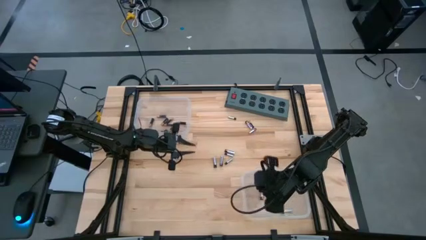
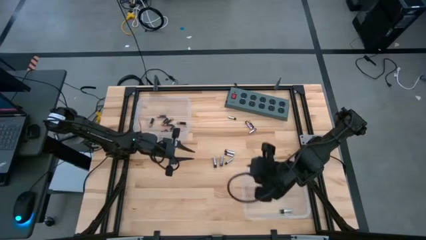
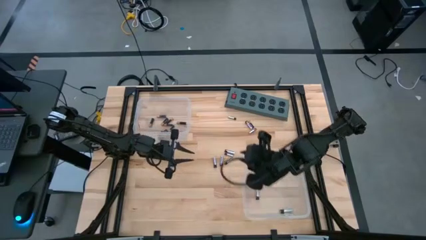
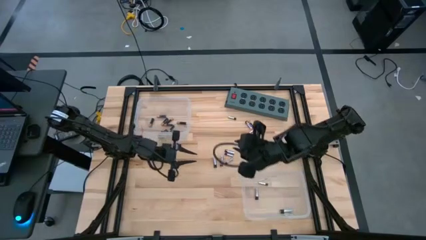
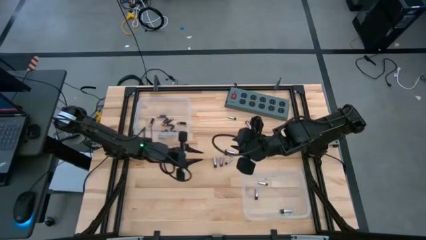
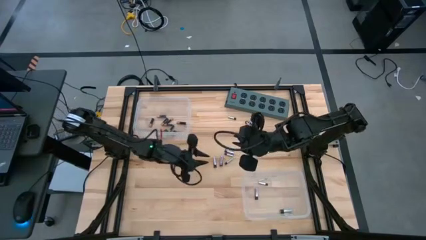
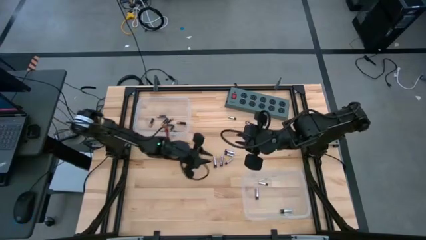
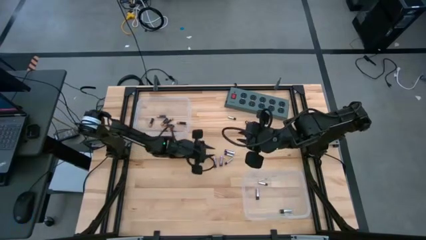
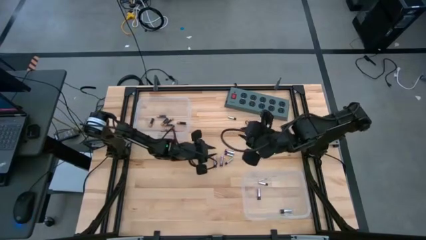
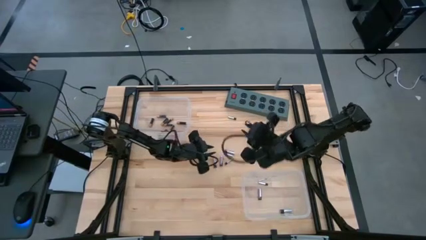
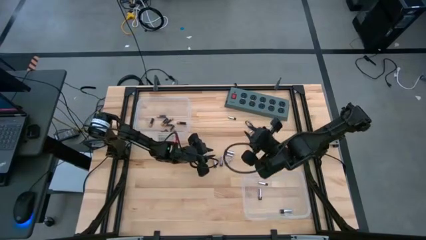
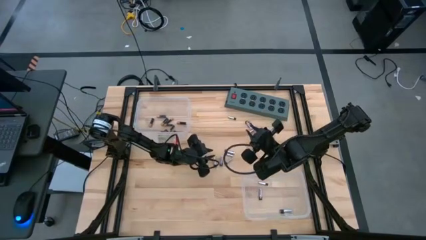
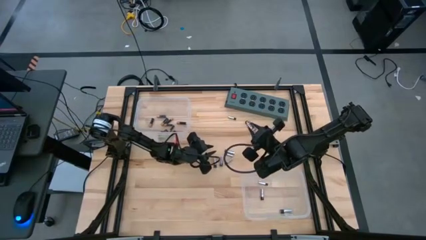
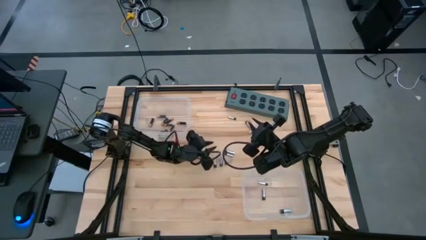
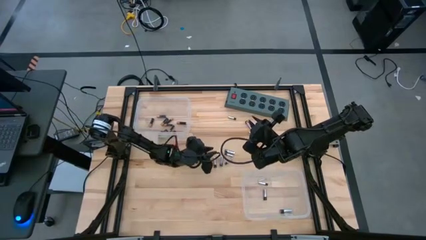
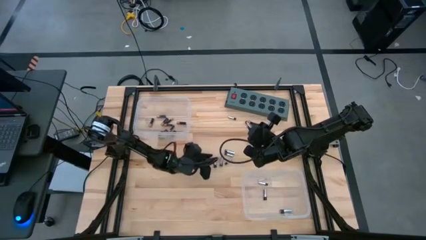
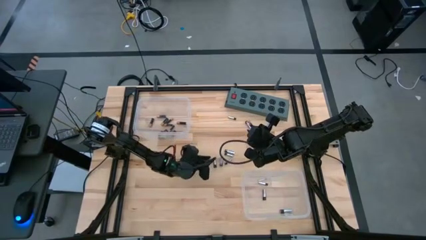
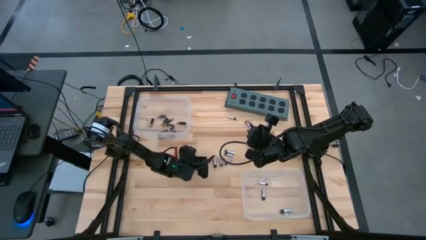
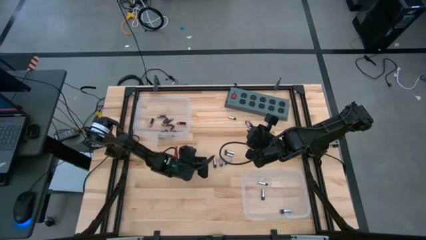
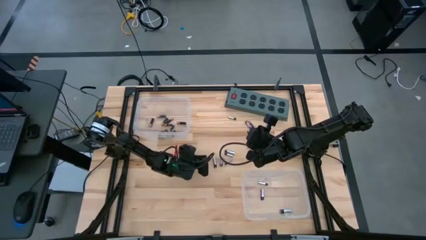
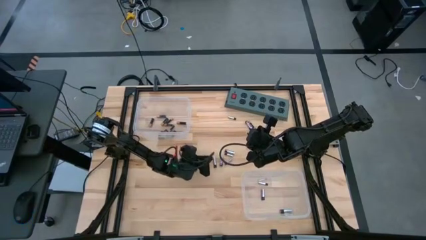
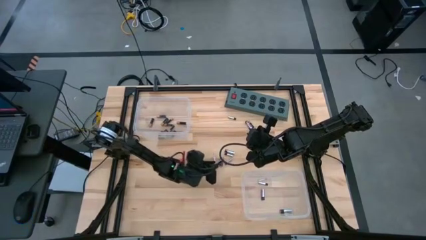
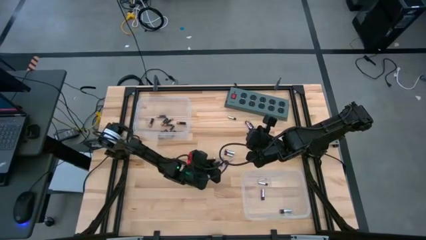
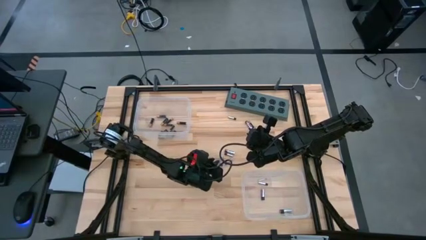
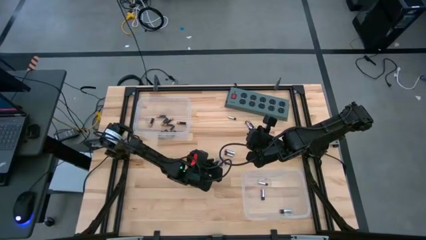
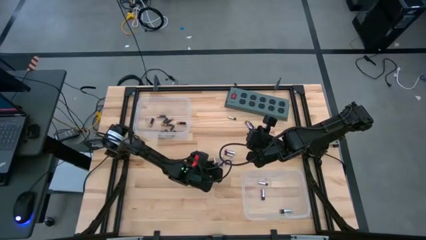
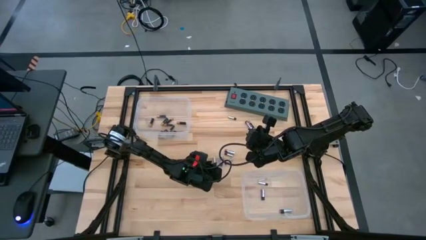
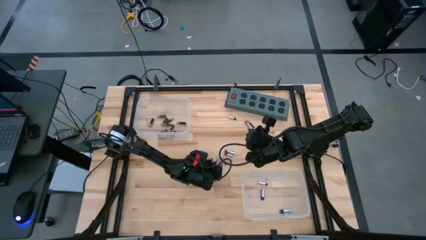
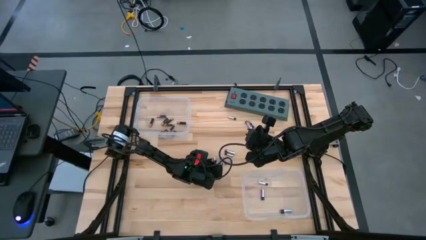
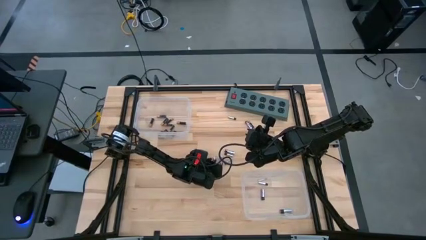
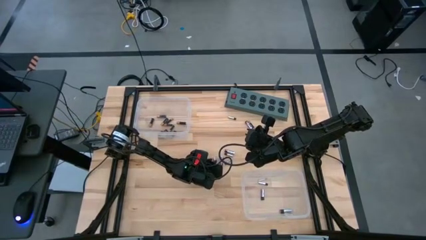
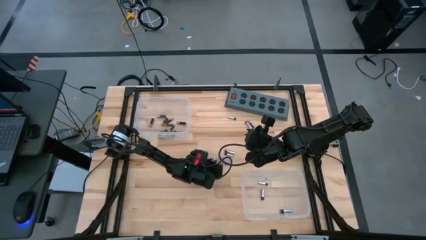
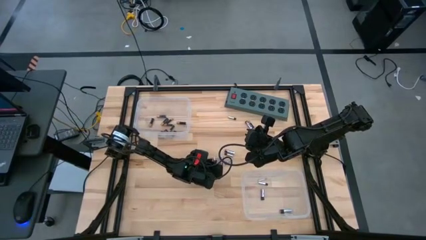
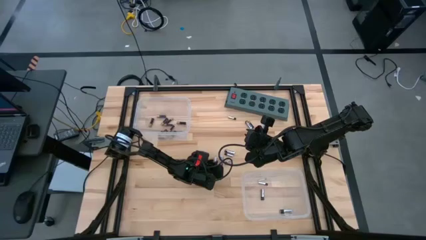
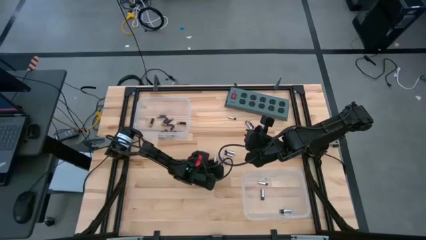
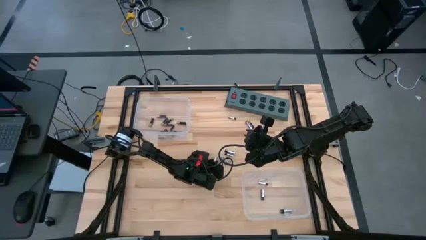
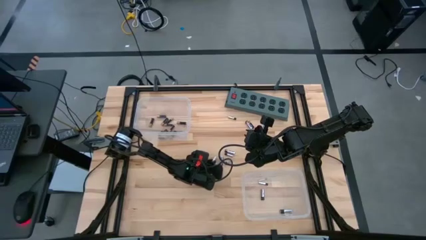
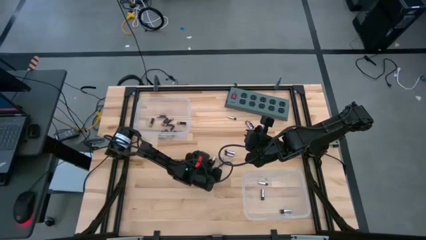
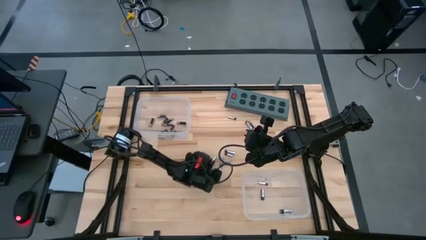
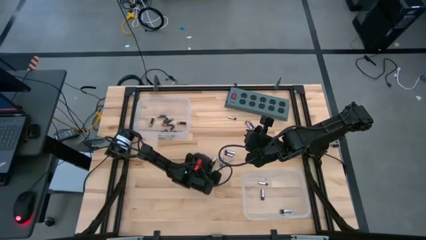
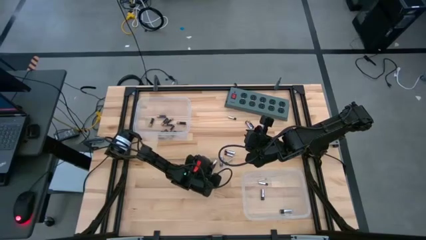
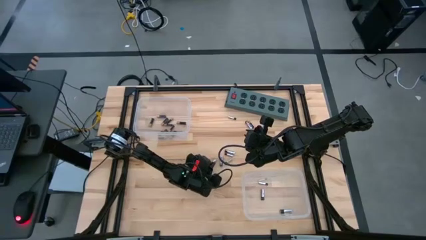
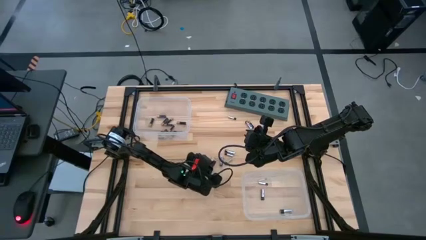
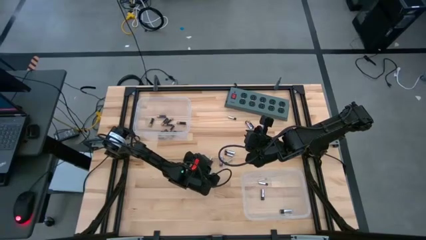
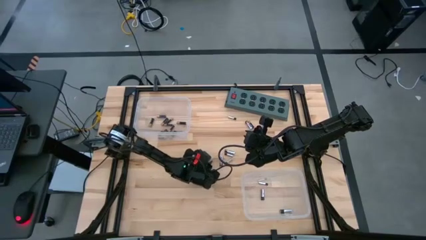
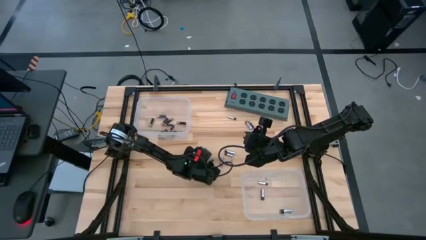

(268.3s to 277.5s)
Task: Sort batteries
Put the silver battery into the bottom transparent bin

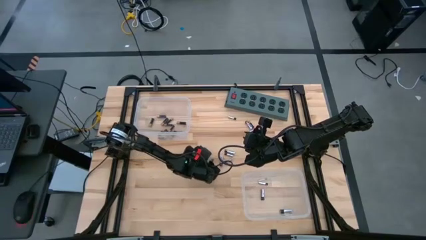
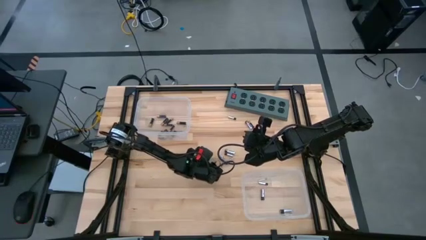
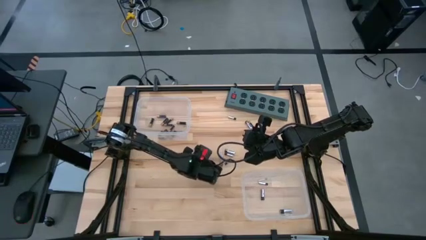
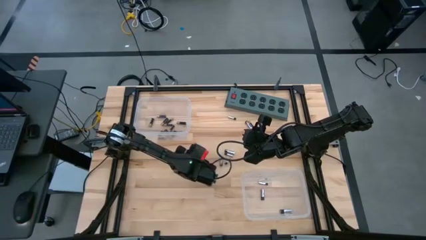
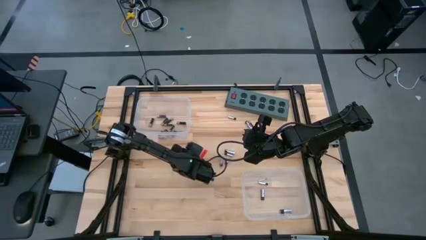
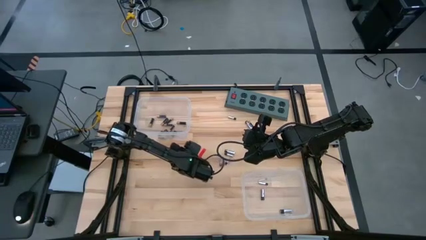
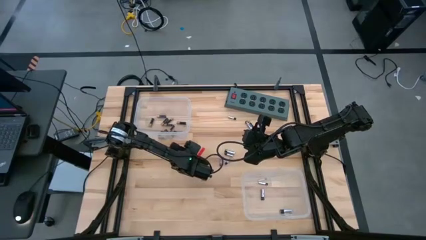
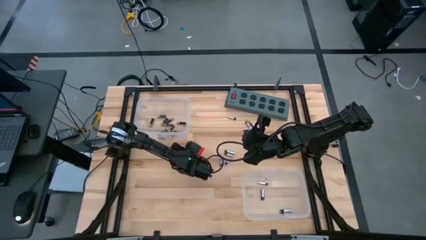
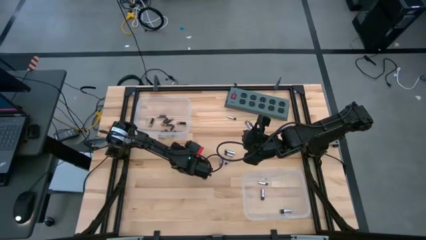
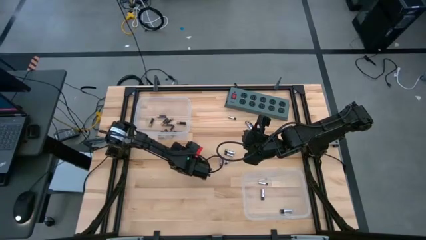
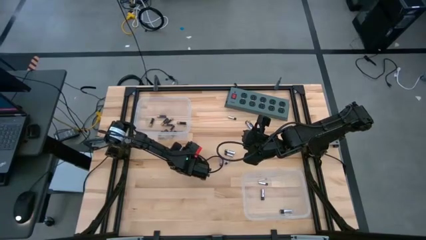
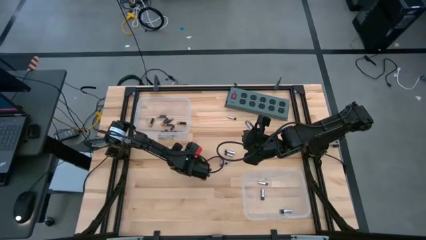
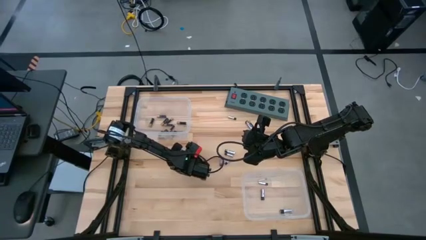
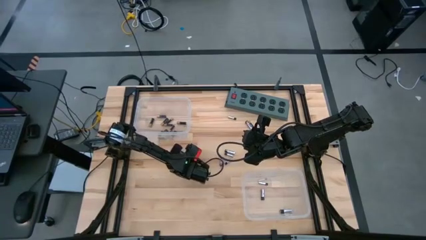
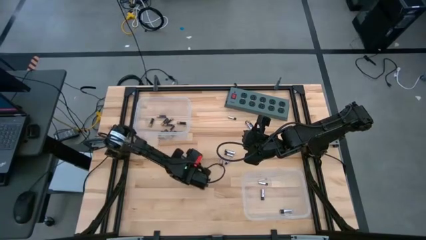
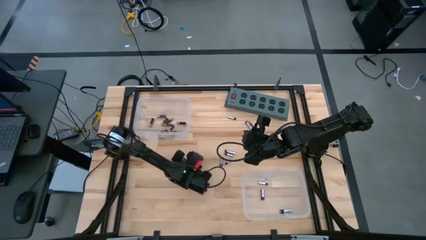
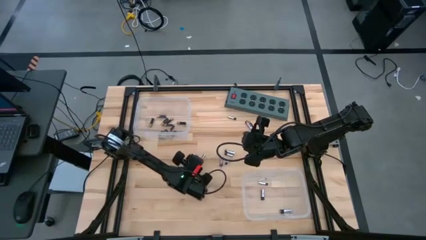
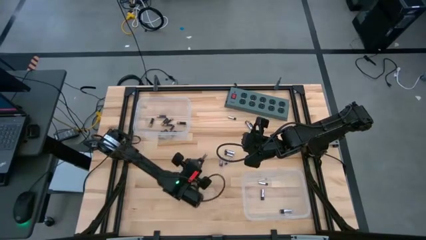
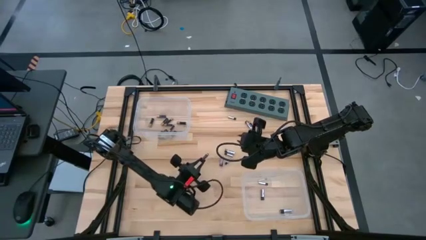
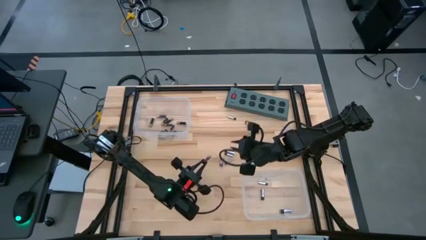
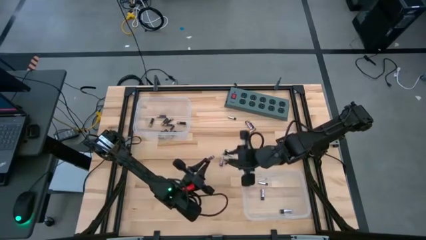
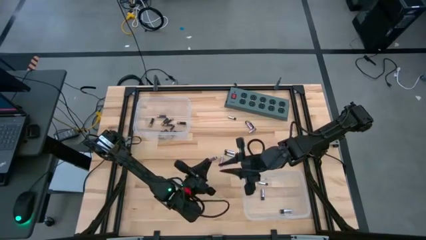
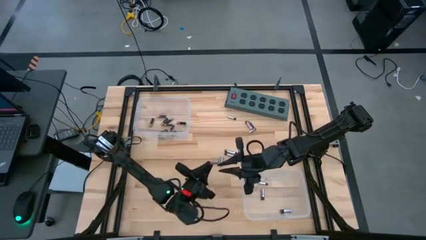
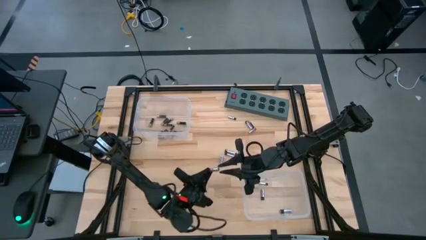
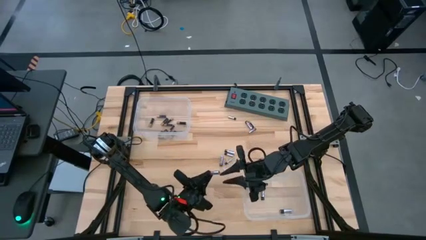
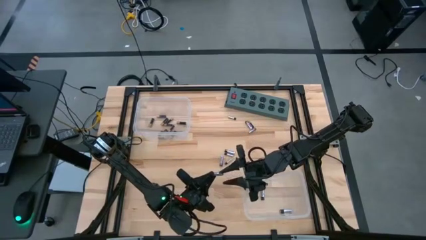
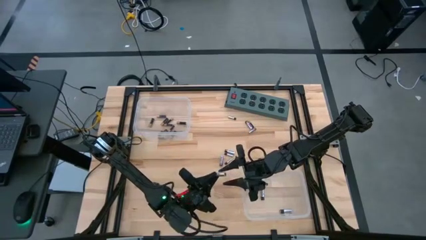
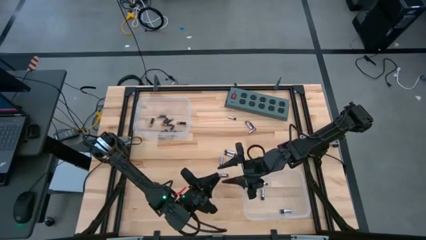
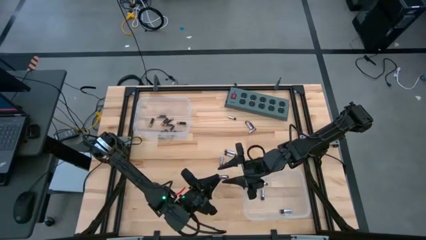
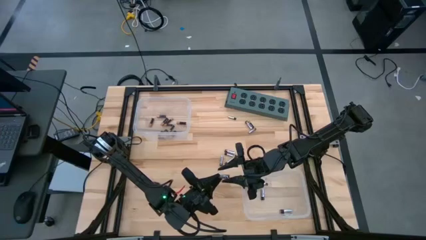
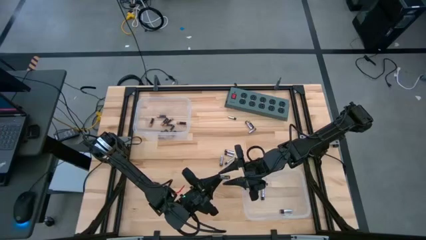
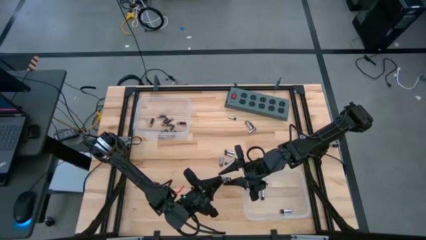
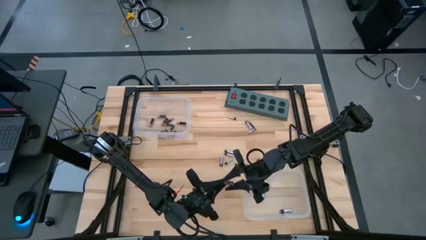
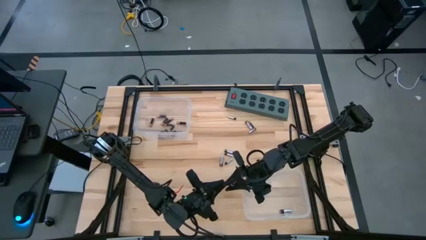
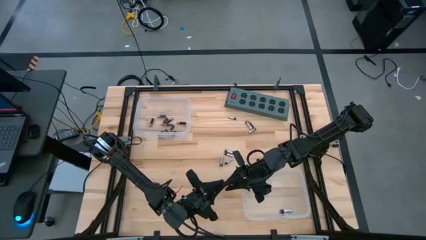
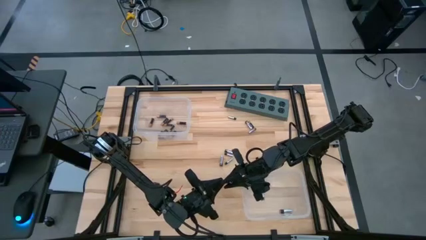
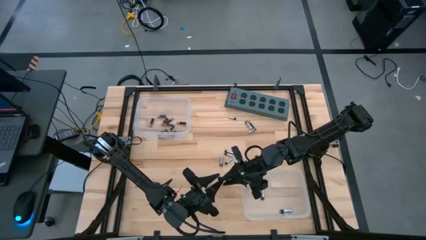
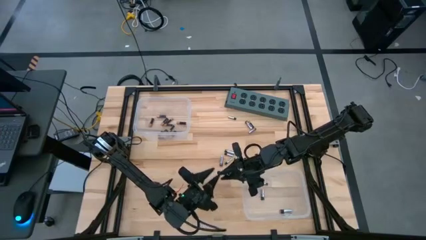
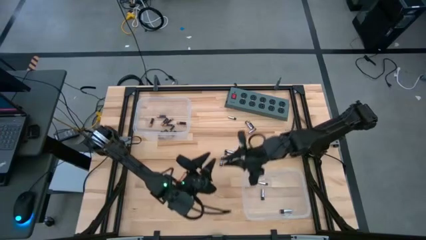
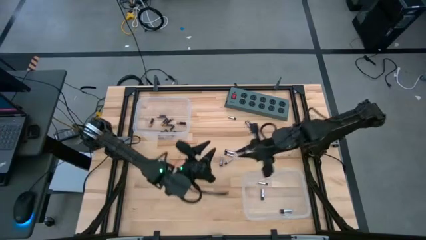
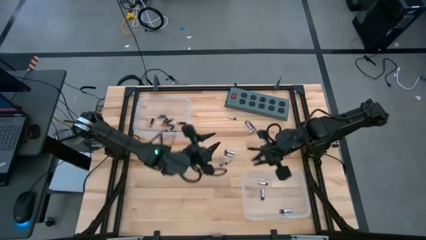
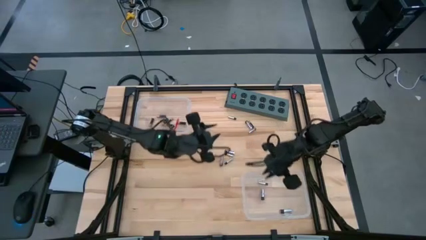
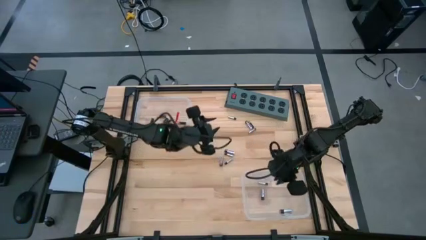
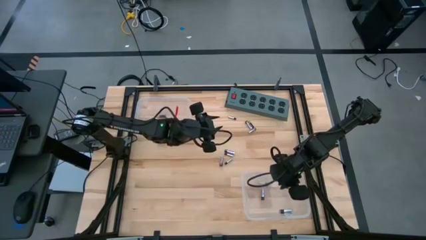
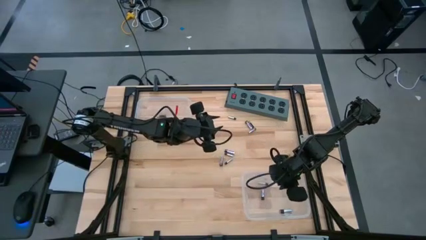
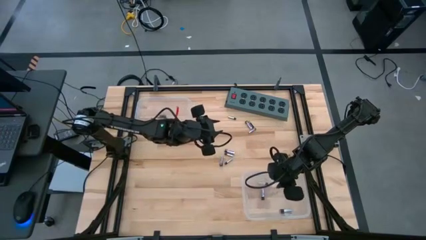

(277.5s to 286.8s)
Put the silver battery into the bottom transparent bin
